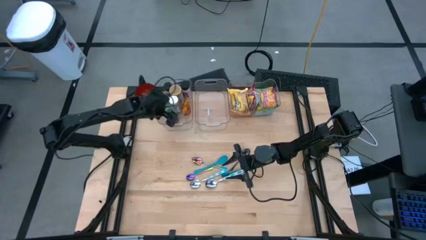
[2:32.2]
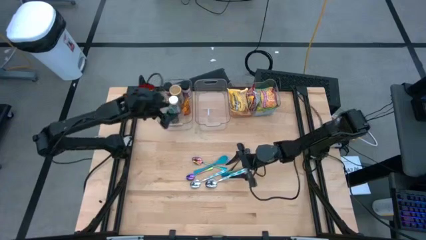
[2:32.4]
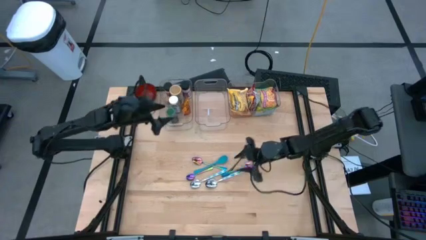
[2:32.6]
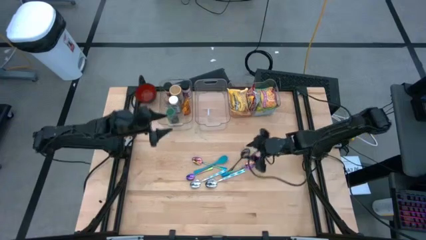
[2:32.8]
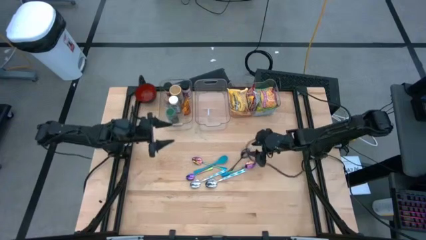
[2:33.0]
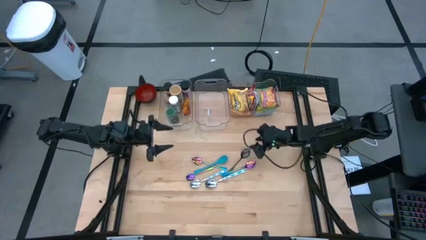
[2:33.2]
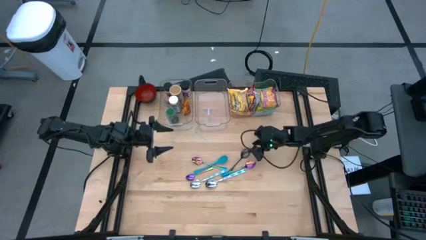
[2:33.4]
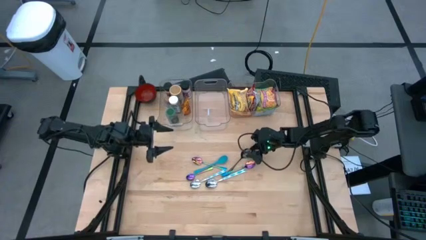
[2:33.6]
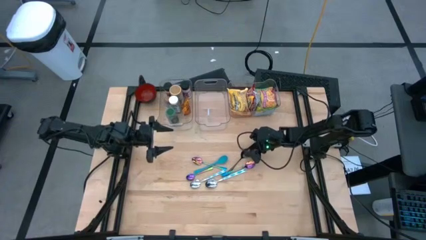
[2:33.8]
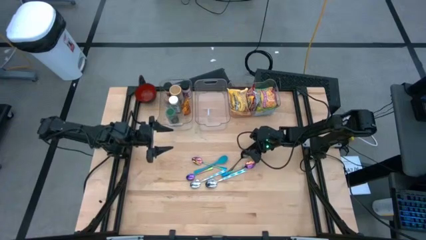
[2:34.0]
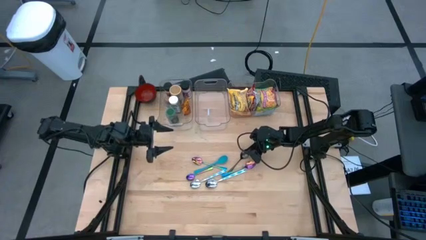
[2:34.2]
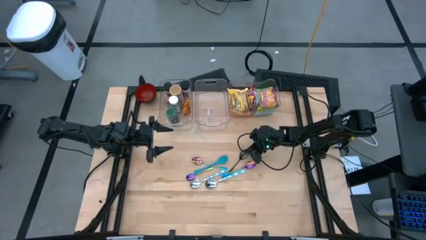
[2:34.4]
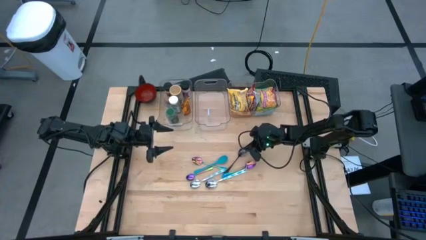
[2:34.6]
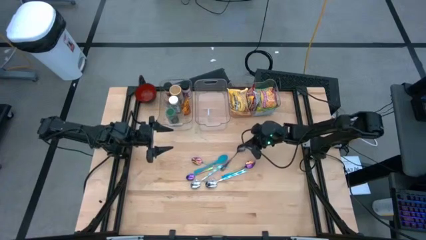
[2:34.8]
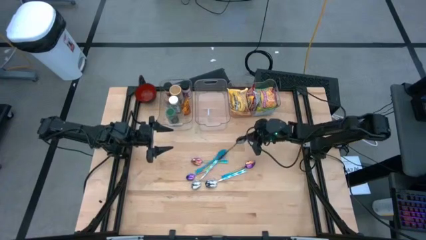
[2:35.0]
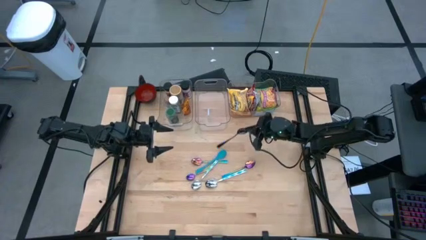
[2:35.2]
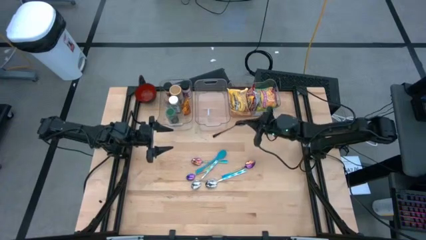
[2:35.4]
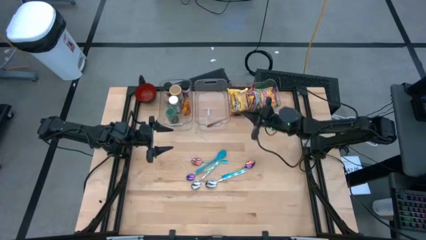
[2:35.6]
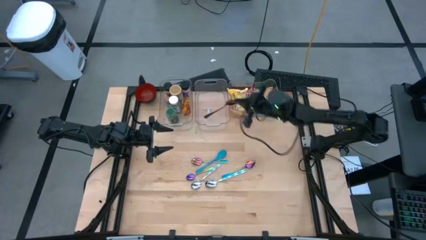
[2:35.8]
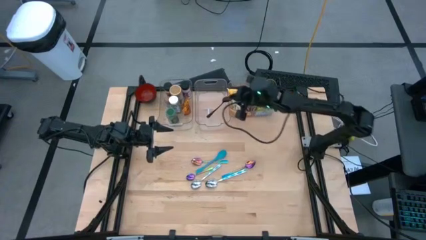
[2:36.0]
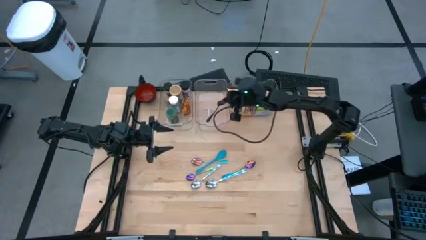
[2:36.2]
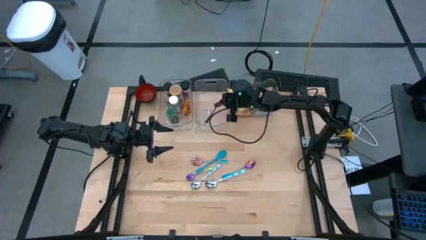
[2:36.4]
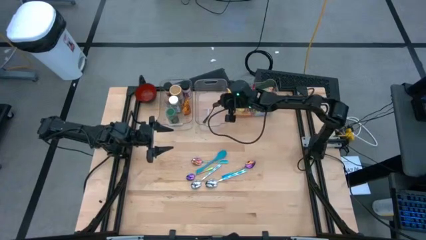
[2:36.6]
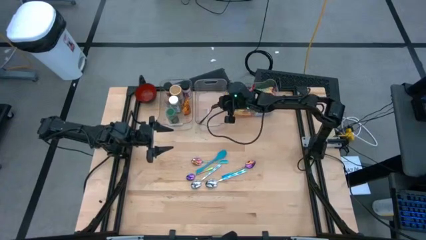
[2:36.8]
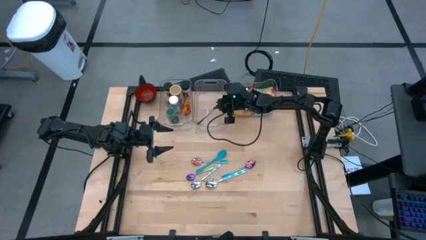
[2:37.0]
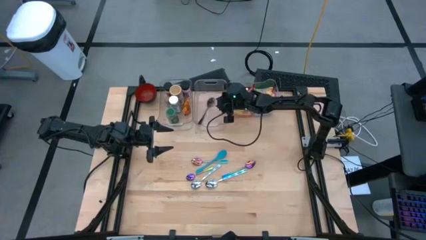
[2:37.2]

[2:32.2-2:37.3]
Task: Pick & Place Food Item
Put the black spoon into the middle transparent bin

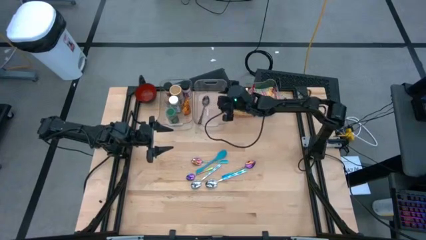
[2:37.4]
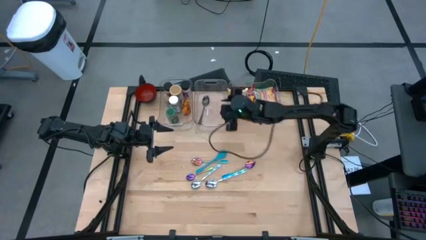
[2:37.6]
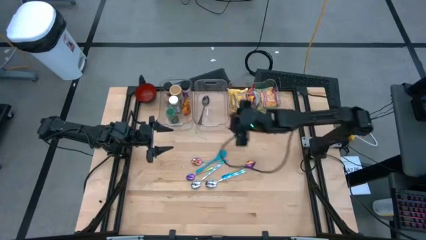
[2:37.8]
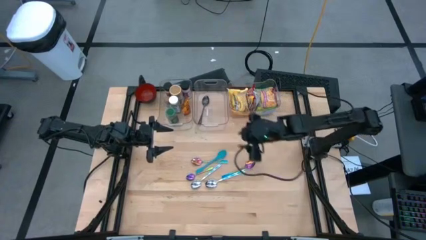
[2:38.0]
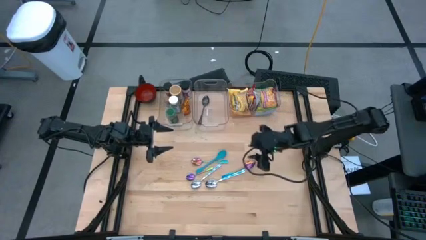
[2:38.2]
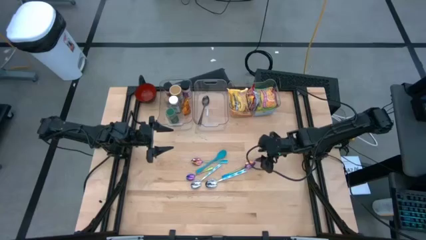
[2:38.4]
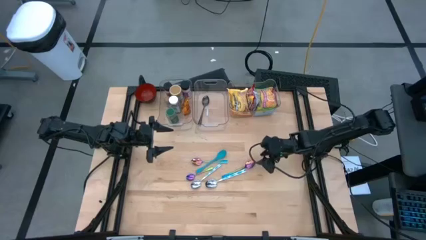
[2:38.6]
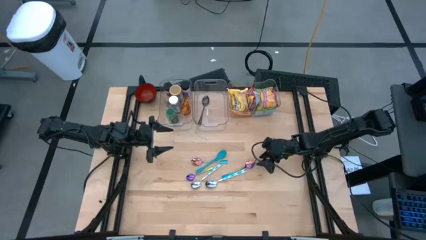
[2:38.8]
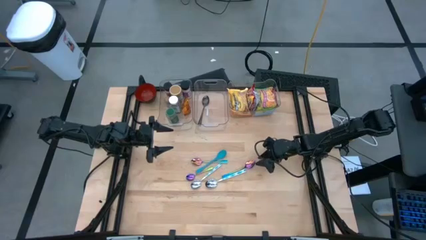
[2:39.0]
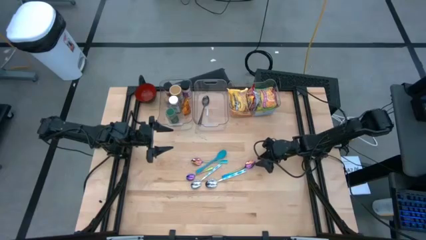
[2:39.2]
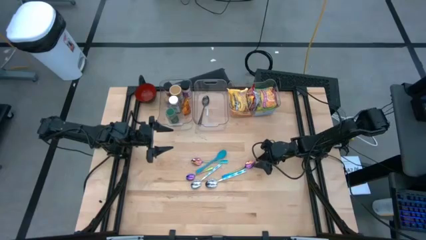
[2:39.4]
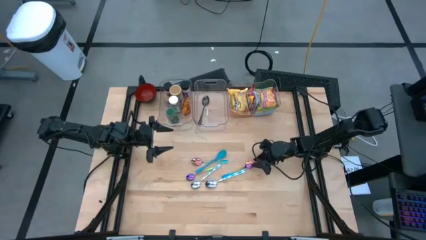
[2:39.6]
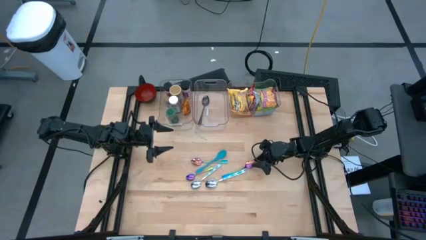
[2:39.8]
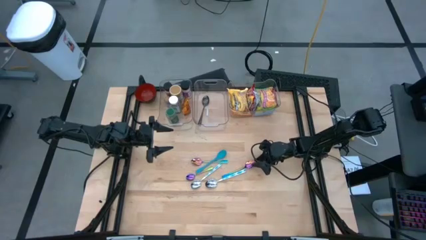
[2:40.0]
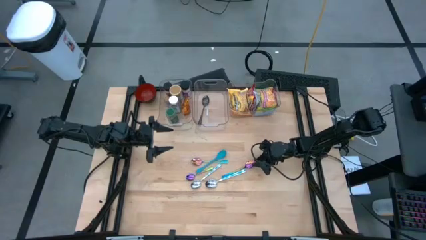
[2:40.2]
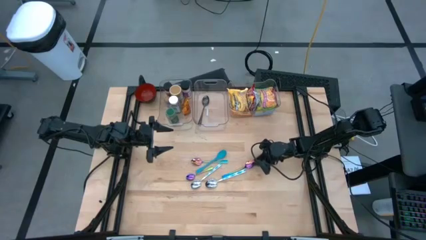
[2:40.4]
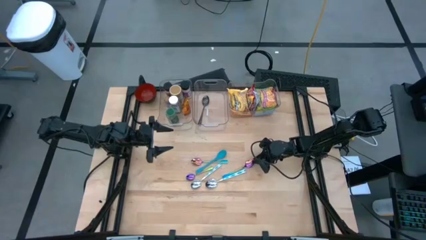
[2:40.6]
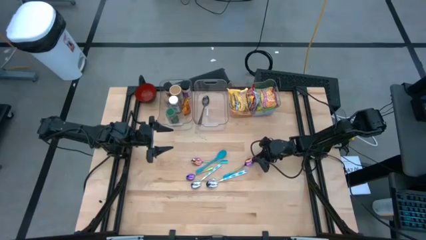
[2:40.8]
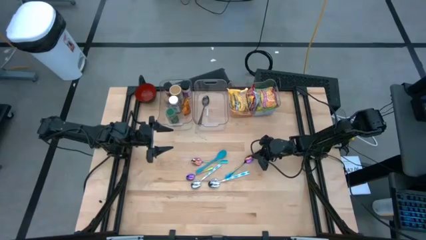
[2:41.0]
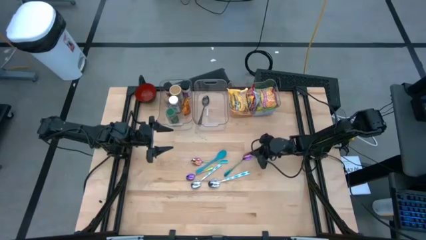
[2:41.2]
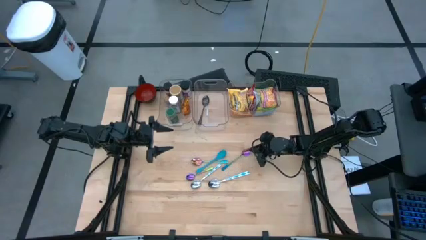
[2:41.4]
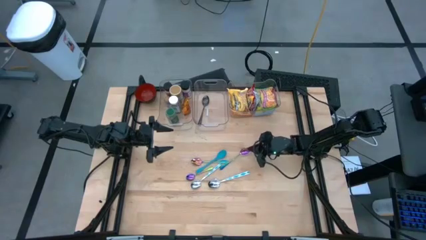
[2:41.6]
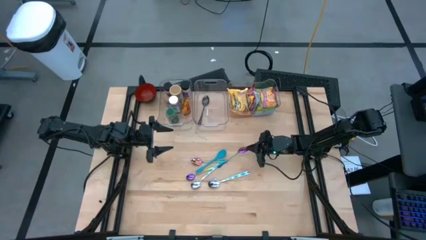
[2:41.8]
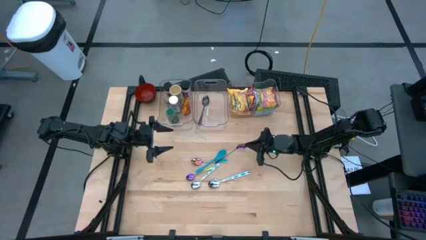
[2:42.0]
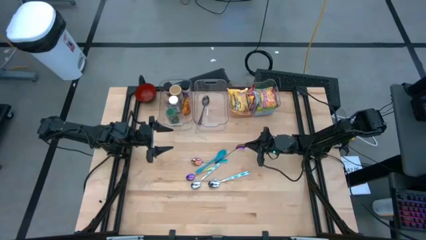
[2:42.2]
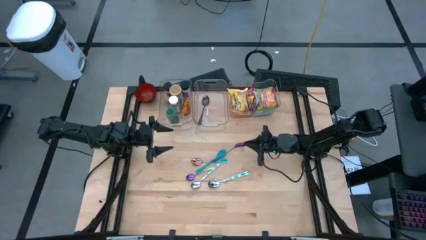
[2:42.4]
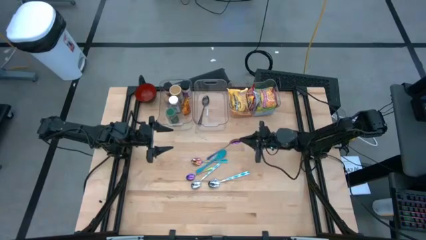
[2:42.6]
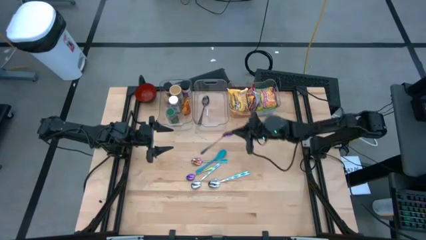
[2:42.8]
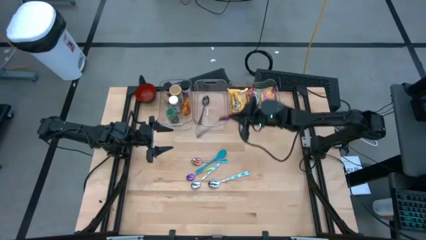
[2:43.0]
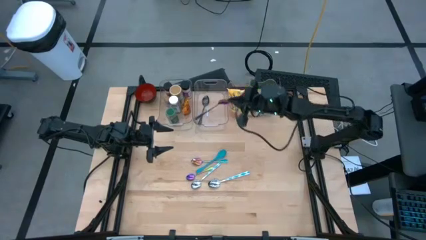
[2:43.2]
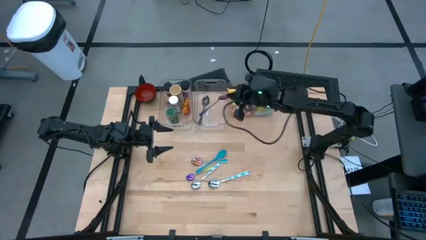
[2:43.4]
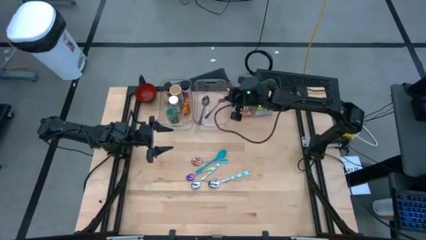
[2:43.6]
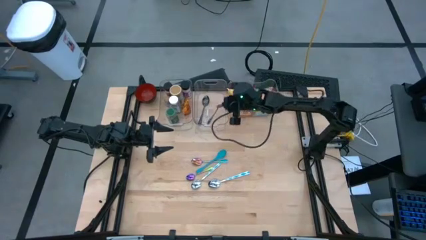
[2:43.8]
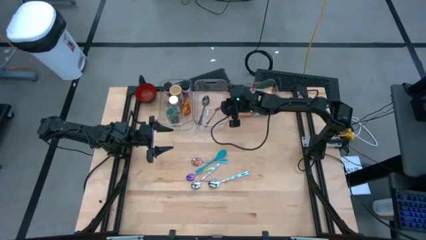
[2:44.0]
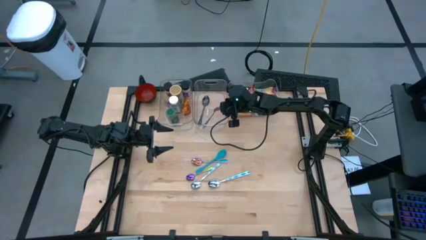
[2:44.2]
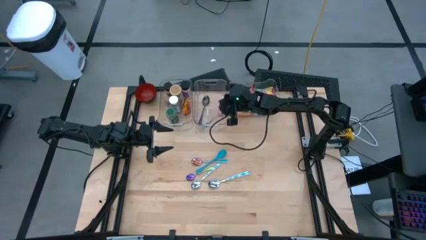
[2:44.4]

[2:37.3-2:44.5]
Put the bottom right purple spoon into the middle transparent bin

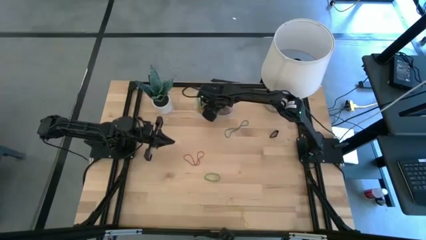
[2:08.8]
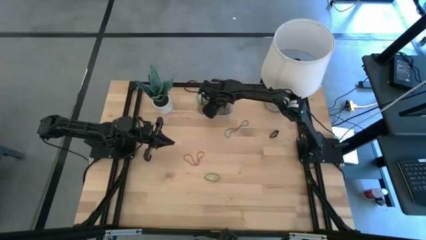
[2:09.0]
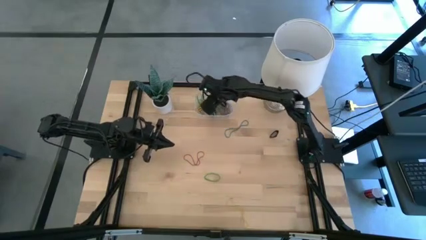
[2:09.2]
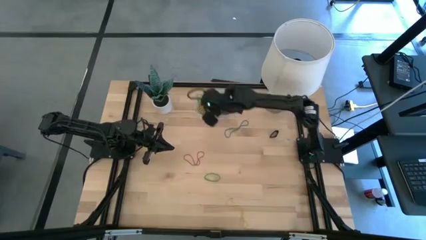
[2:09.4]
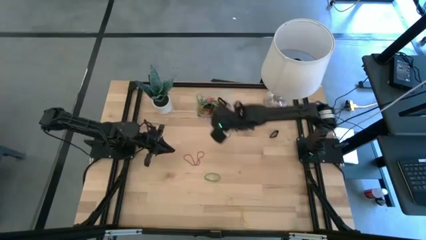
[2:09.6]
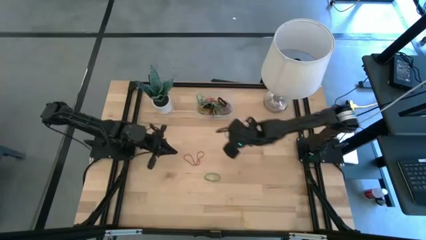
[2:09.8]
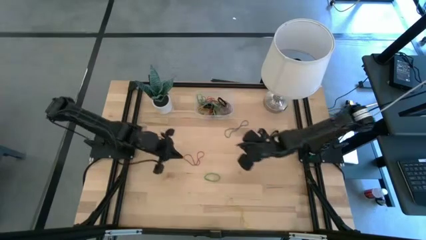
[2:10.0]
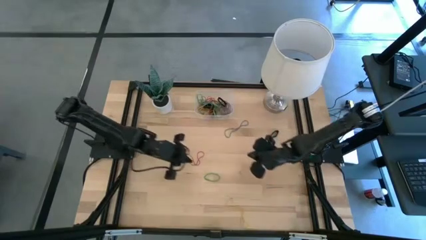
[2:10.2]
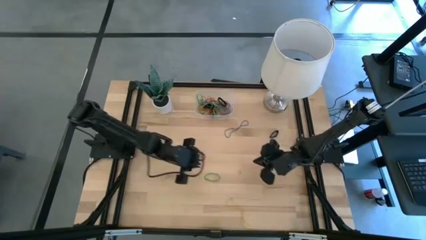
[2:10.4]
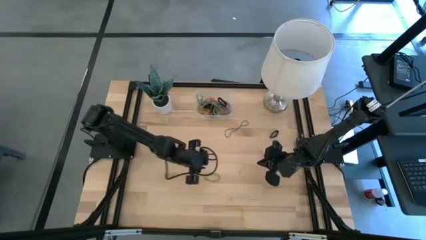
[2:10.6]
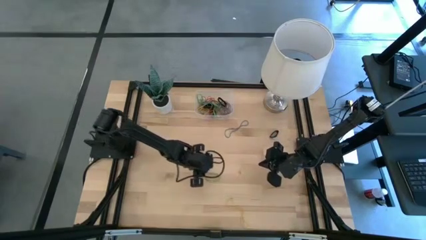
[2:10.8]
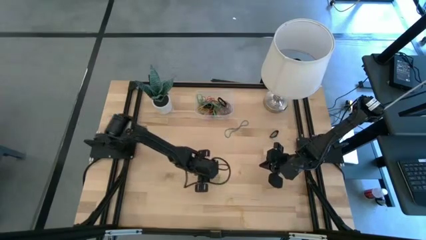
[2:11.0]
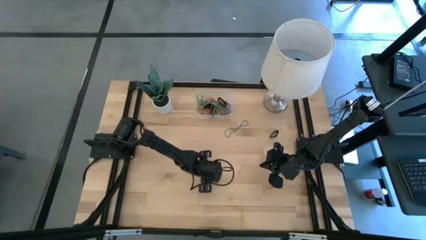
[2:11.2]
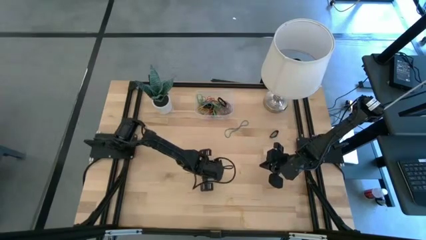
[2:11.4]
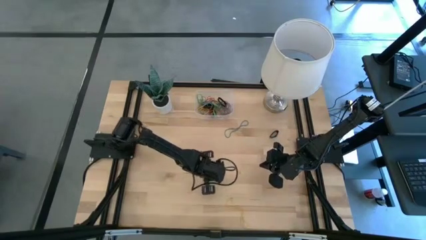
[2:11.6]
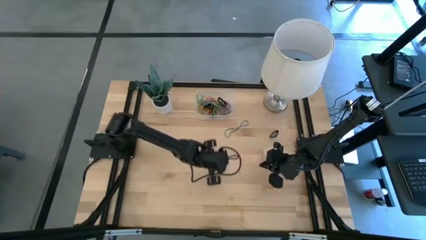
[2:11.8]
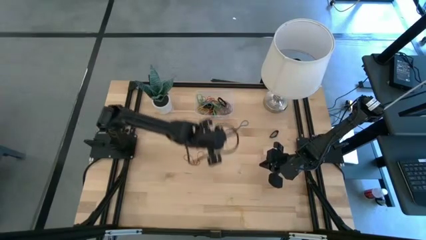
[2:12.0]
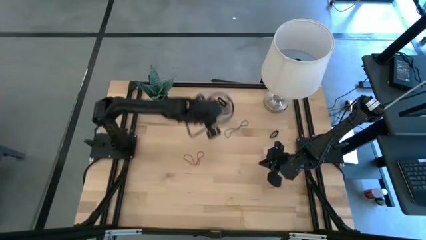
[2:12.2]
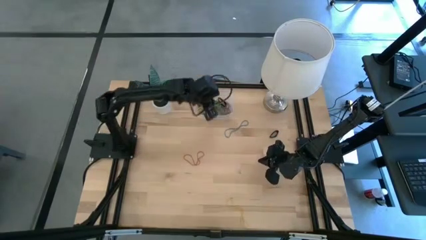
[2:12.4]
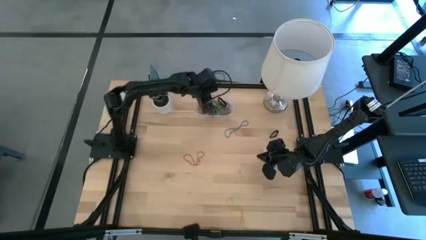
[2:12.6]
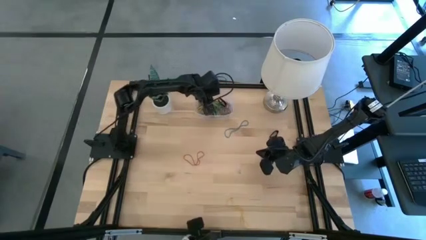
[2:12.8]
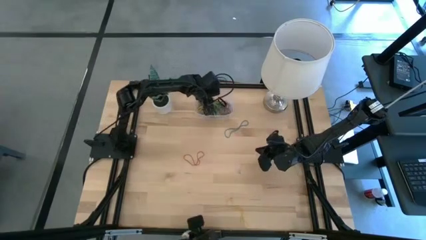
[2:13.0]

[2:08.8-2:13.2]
Task: Pick and place rubber bands into bin
Put the green rubber band into the transparent bin

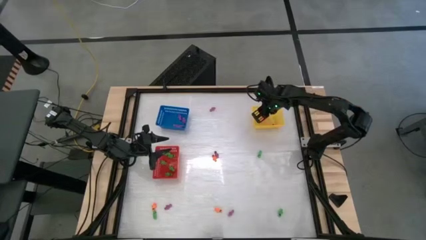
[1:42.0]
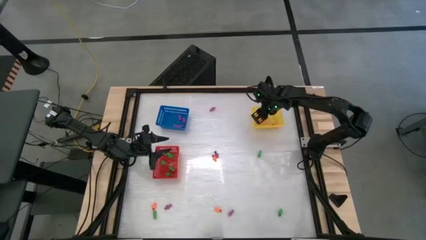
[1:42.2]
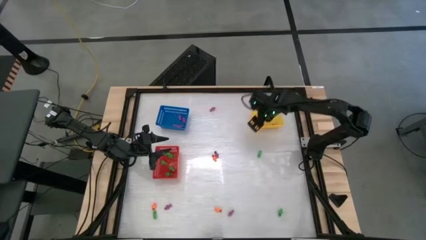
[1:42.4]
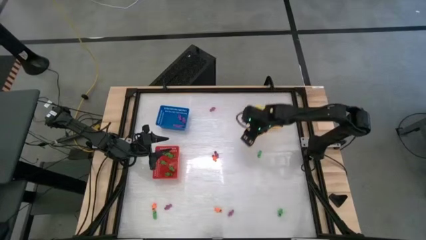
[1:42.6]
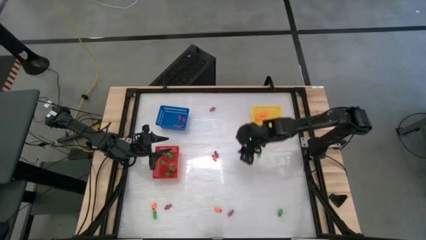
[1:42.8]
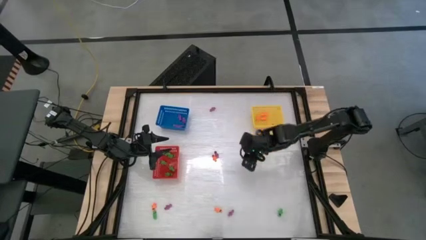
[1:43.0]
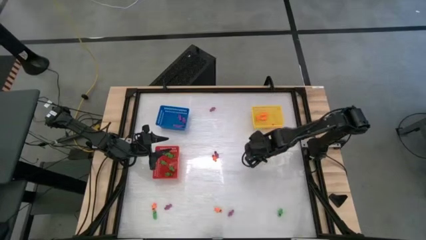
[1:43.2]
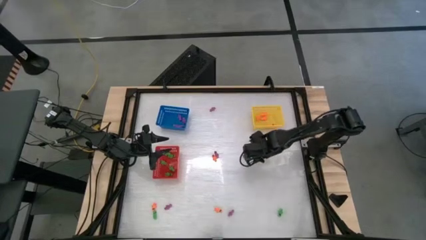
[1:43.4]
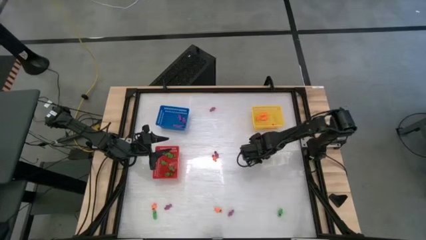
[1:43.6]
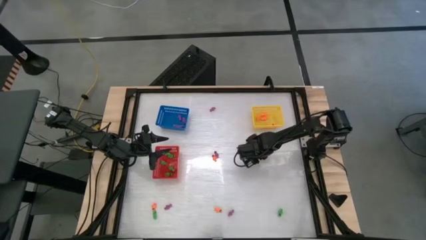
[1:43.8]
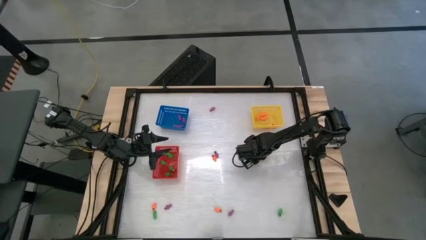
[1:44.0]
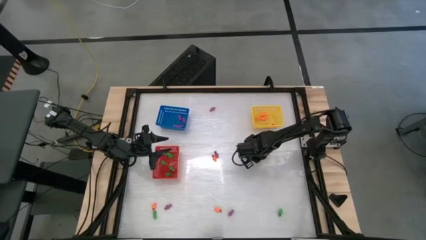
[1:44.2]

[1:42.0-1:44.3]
Task: Sort Halloween decoration
Put the green skeleton toy into the red bin
